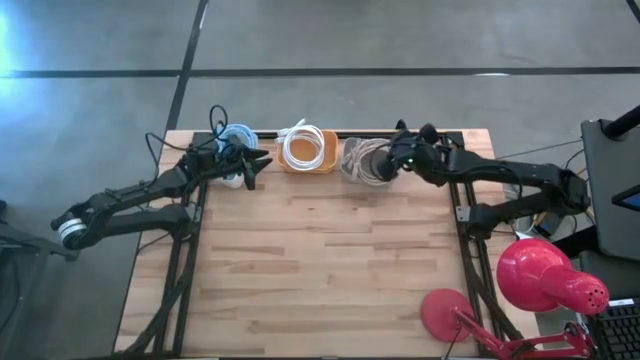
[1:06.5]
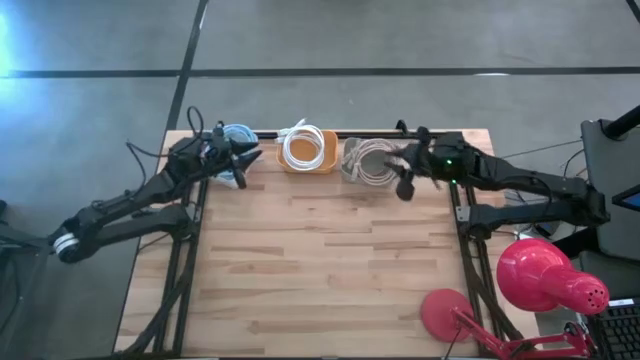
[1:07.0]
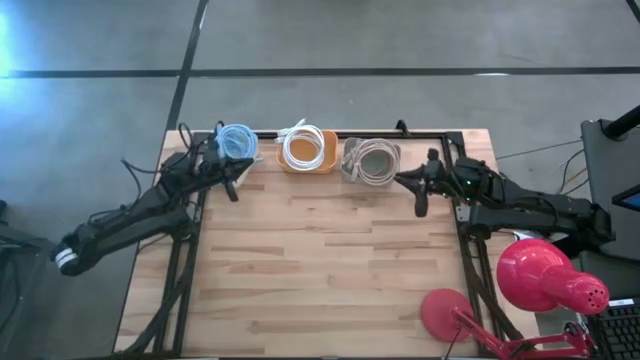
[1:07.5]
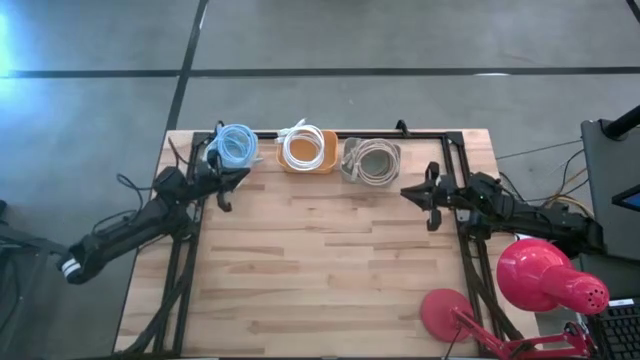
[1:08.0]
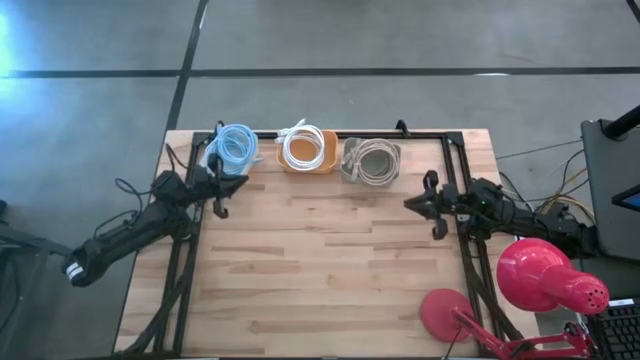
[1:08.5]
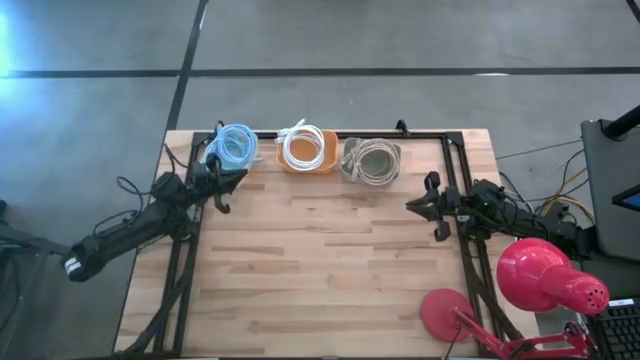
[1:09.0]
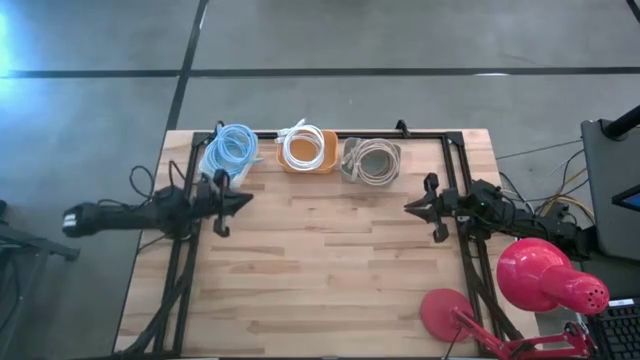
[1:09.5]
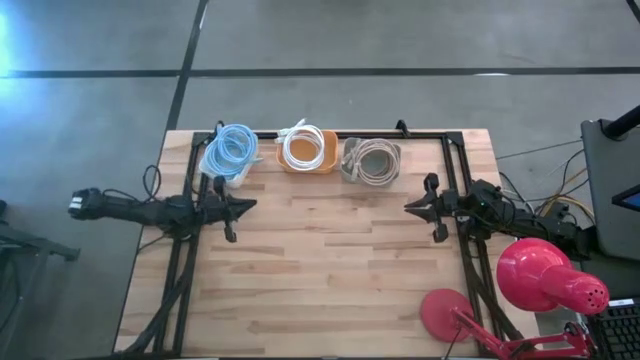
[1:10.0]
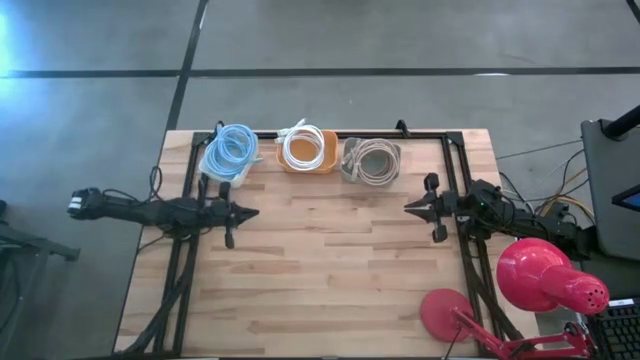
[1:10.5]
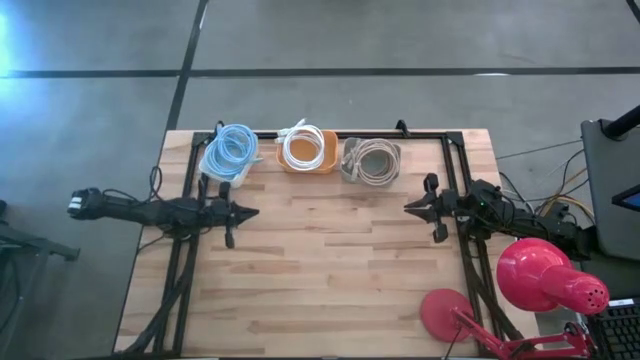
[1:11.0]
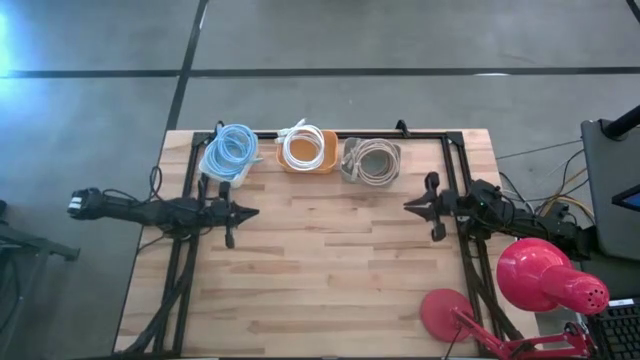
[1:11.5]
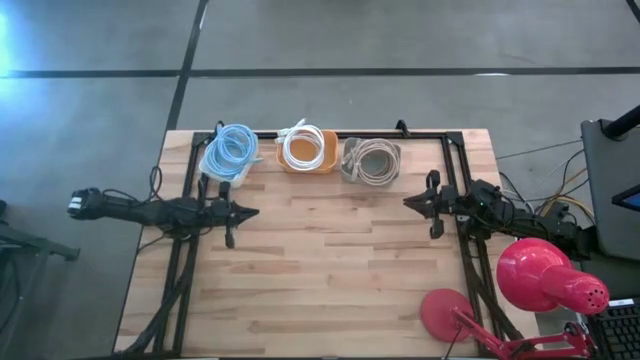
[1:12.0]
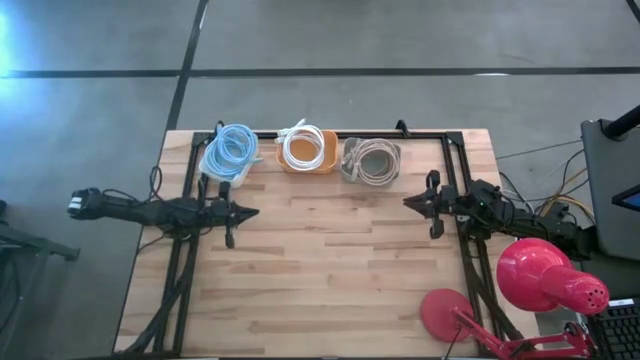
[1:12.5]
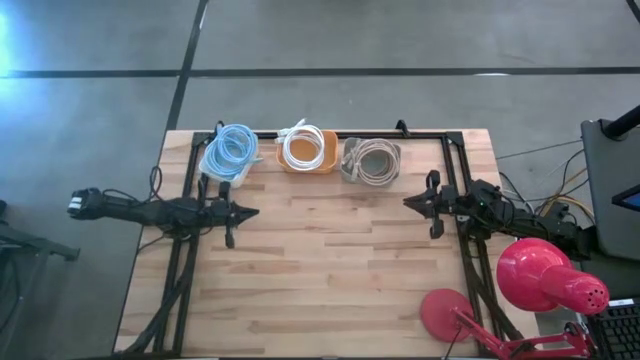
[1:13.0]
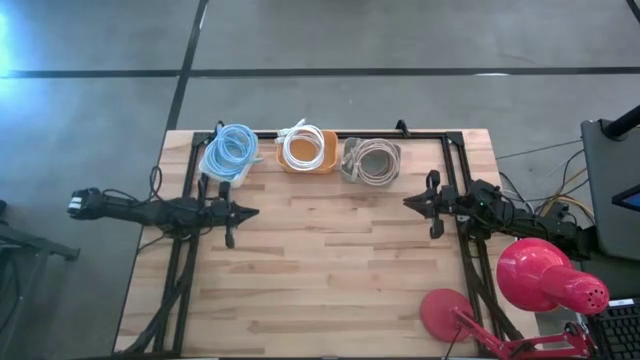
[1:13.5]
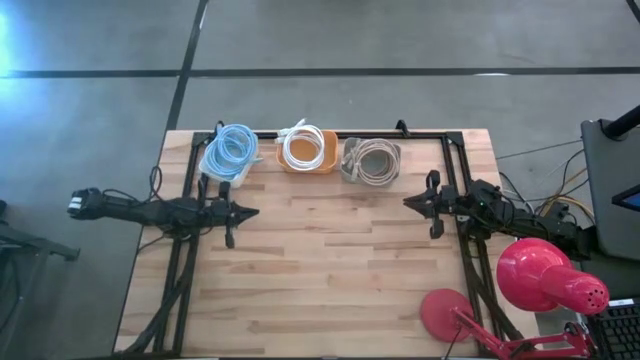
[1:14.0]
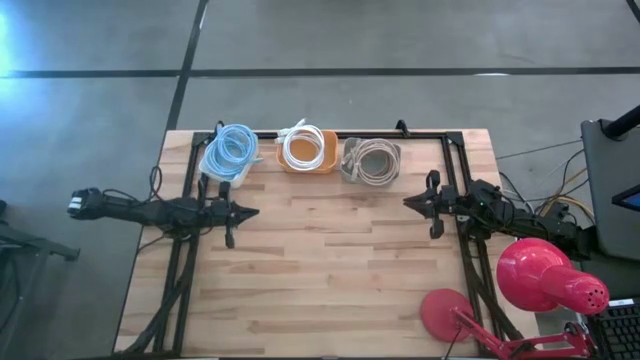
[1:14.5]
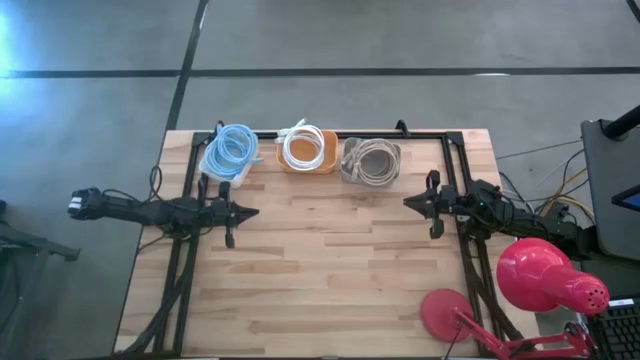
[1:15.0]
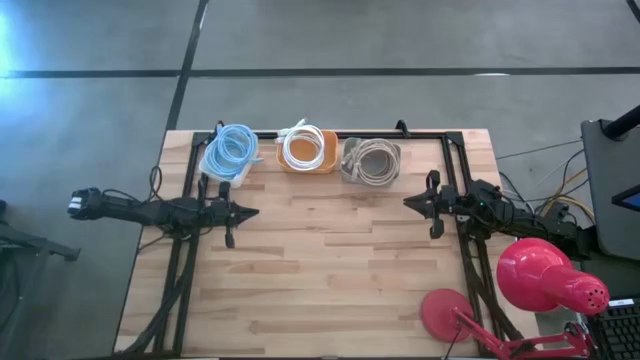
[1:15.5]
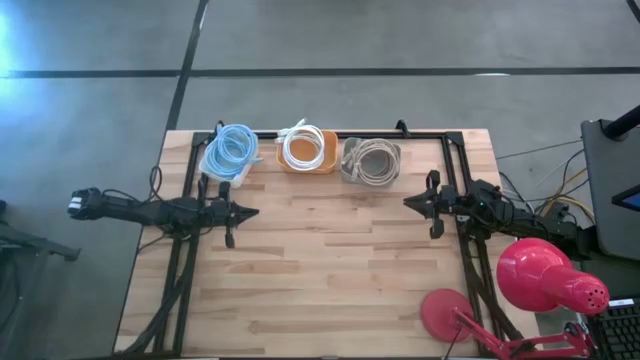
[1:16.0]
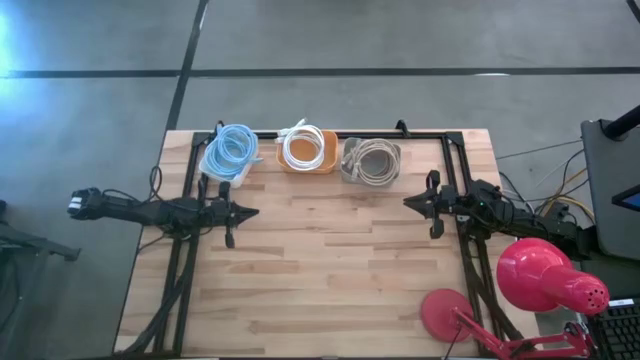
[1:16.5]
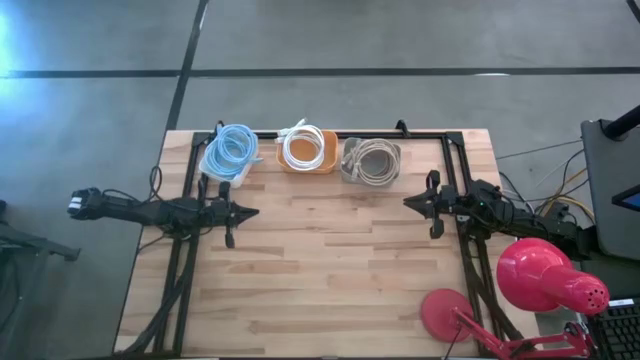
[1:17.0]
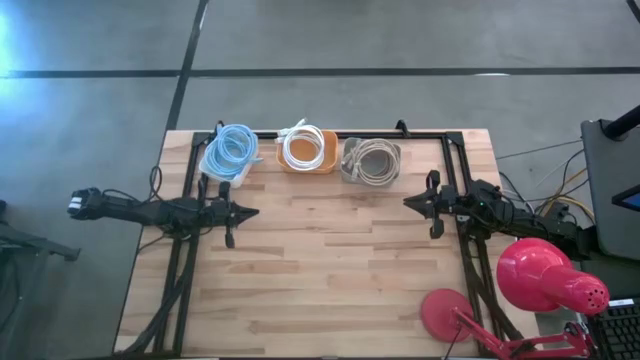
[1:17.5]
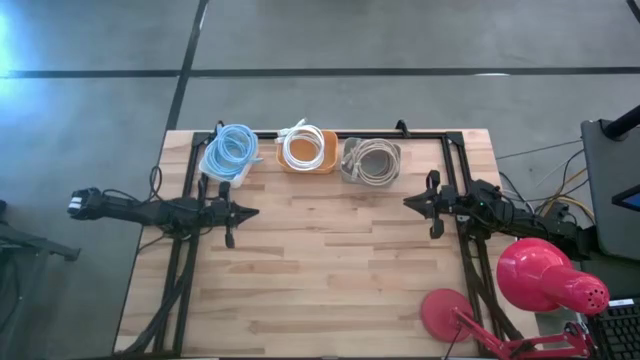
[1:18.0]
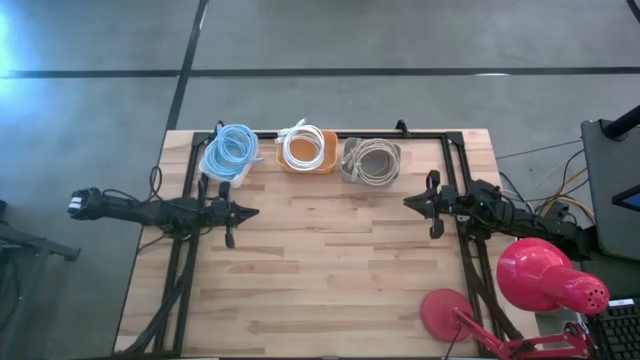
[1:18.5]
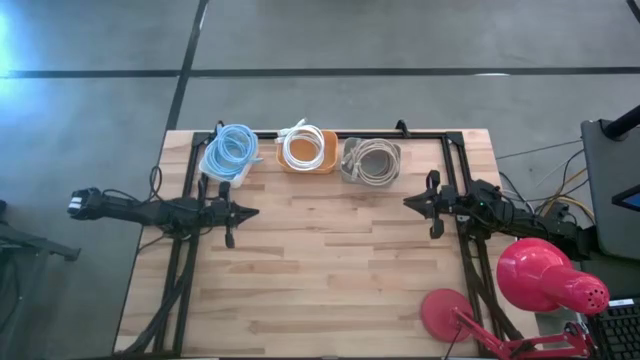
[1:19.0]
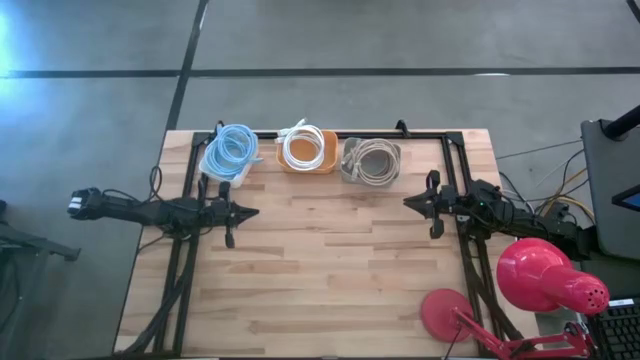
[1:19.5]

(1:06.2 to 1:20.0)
Task: Sort HDMI cables
Return to Home Position

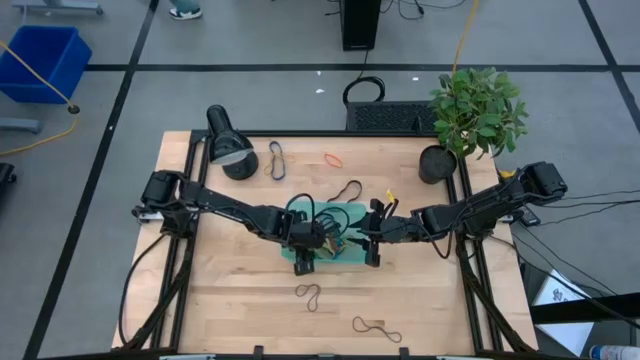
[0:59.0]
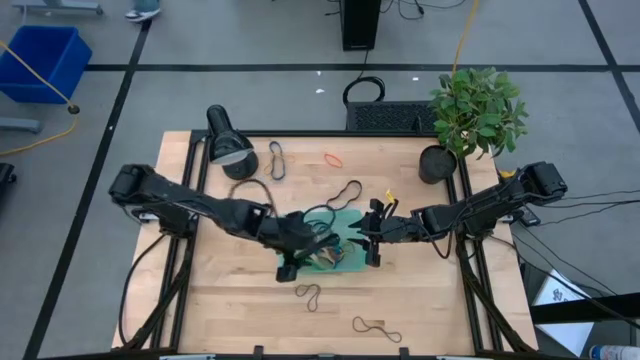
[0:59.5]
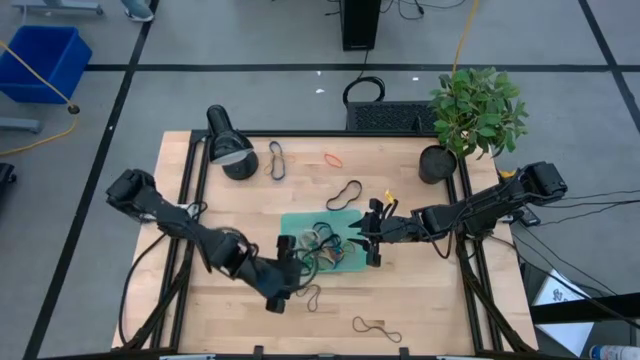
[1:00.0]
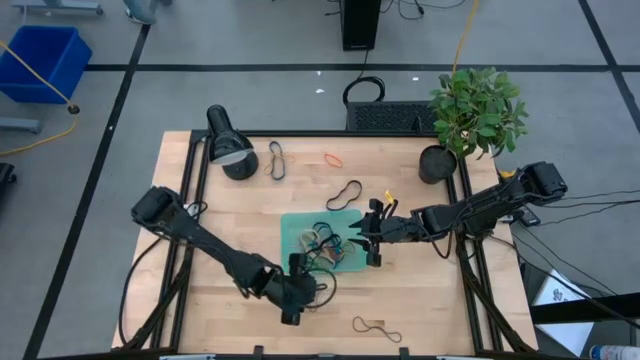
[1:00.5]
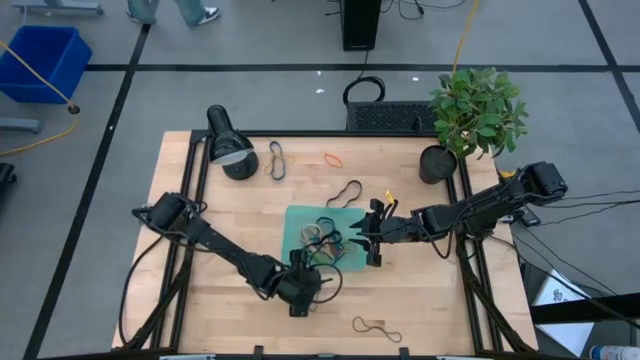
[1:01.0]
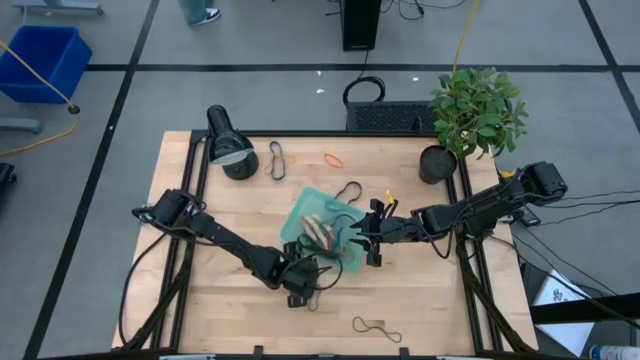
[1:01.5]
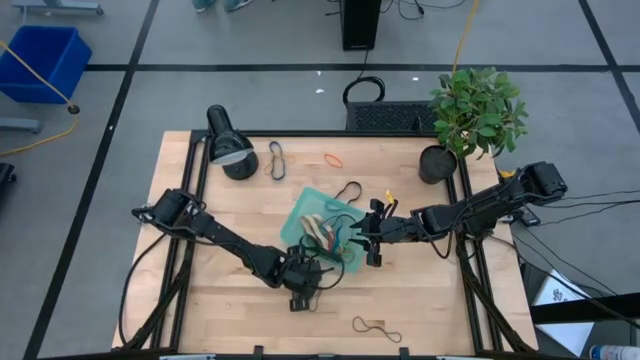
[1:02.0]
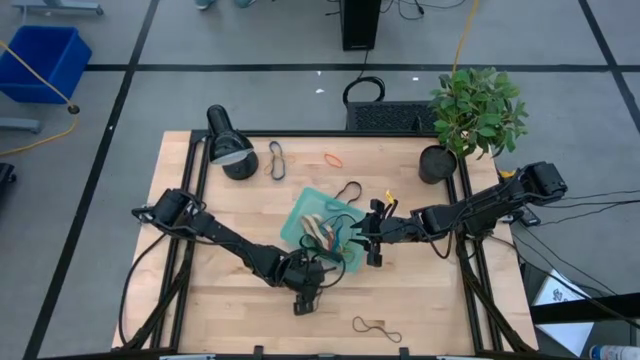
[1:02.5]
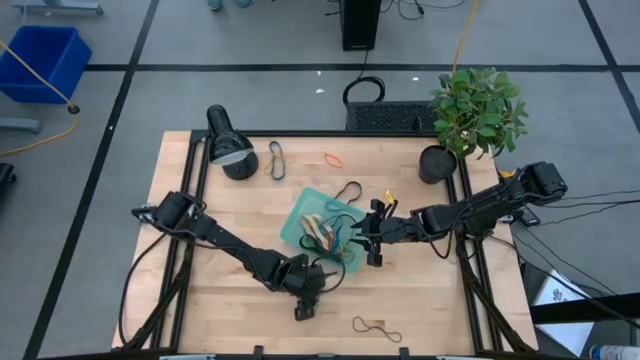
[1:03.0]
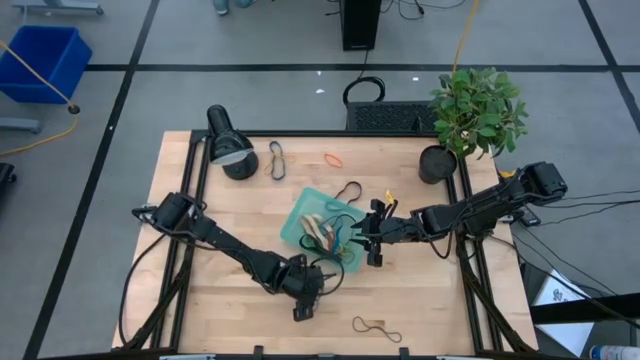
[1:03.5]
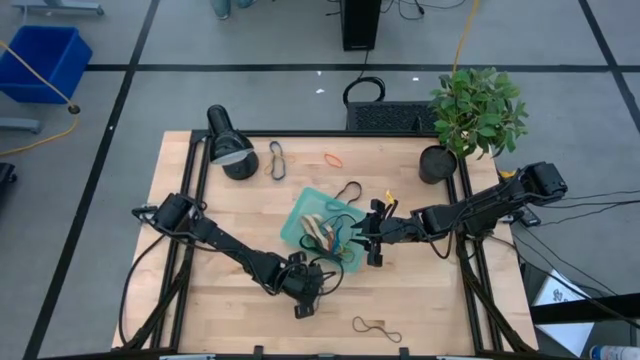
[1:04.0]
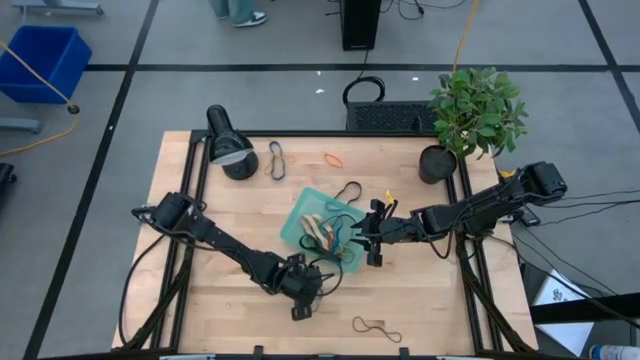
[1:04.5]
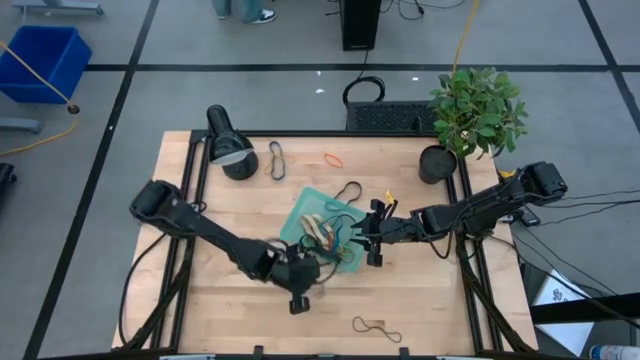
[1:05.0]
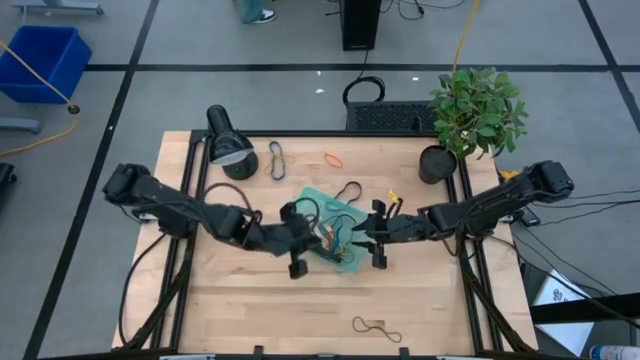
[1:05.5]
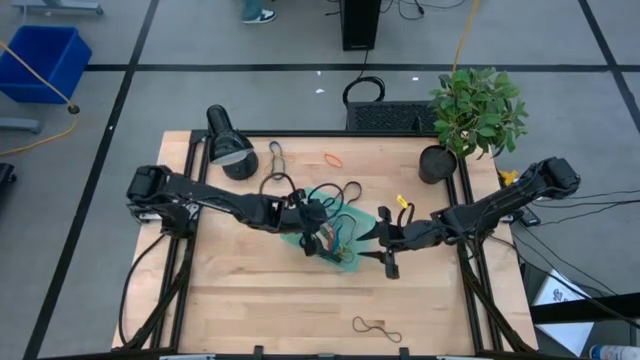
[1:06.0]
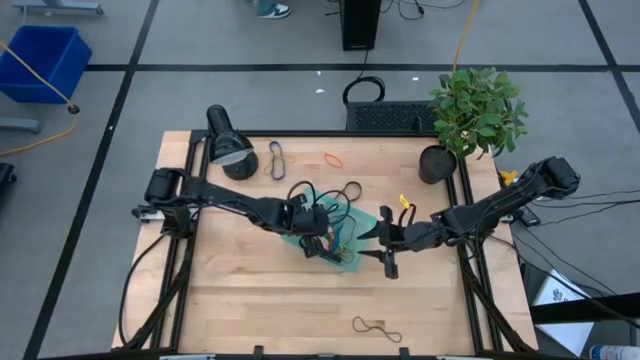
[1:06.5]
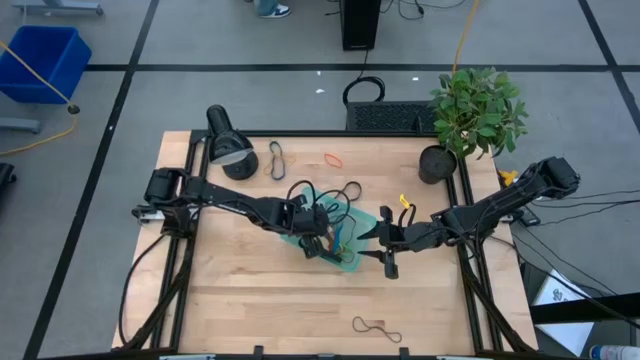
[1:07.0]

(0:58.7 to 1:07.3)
Task: Pick and place rubber bands into bin
Put the purple rubber band into the green bin

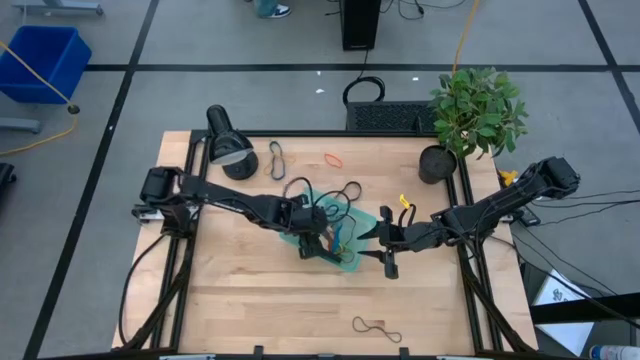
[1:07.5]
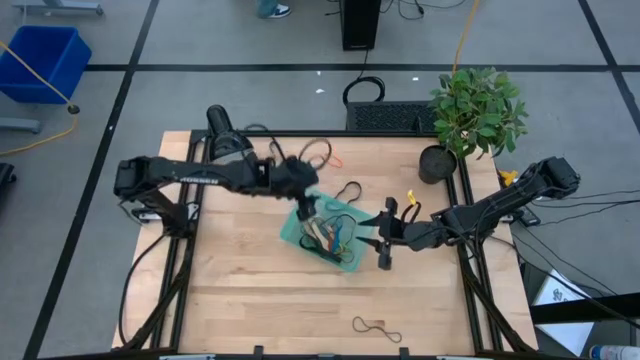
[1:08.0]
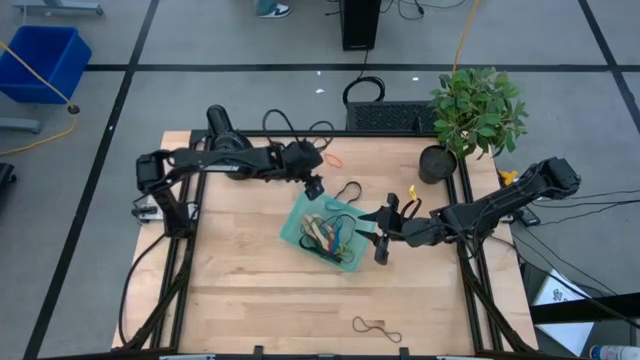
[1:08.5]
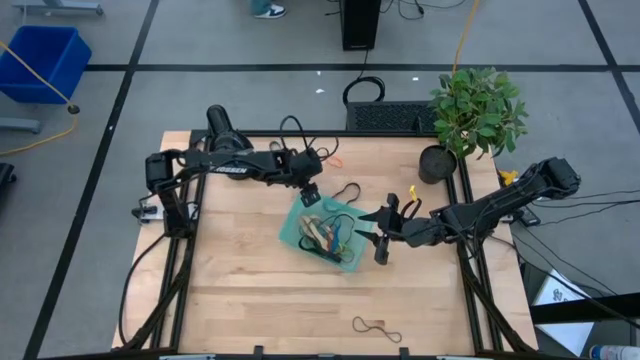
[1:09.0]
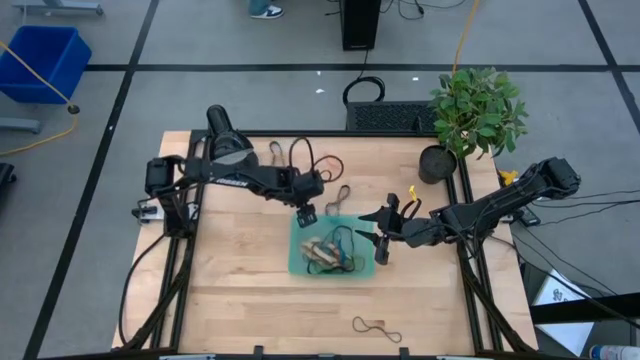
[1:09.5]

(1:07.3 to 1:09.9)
Adjust the green bin
